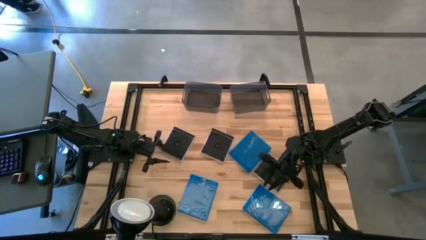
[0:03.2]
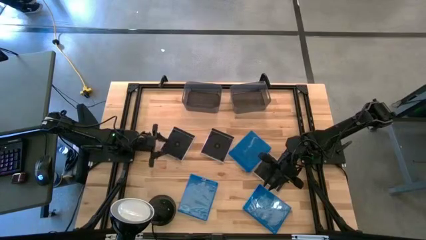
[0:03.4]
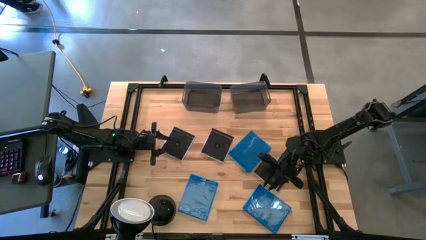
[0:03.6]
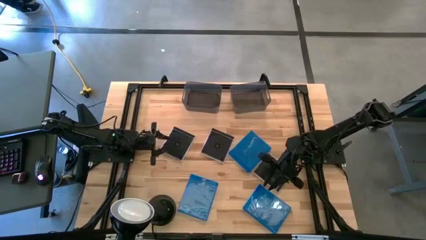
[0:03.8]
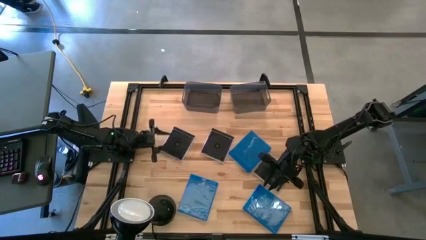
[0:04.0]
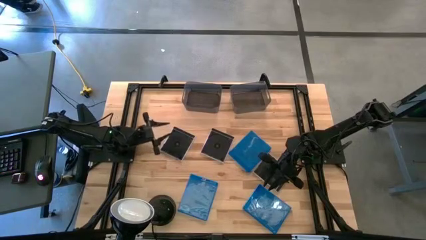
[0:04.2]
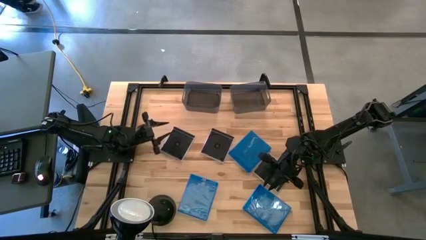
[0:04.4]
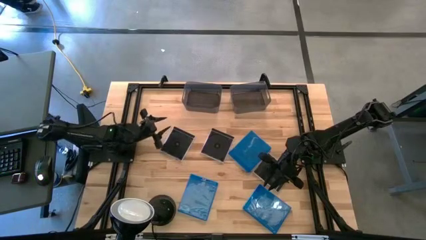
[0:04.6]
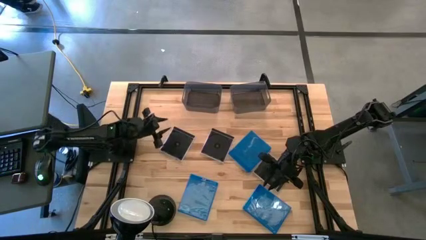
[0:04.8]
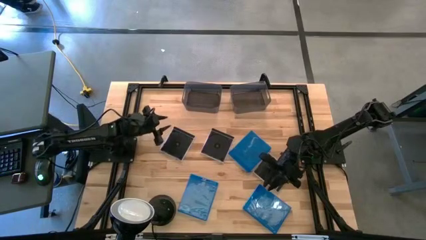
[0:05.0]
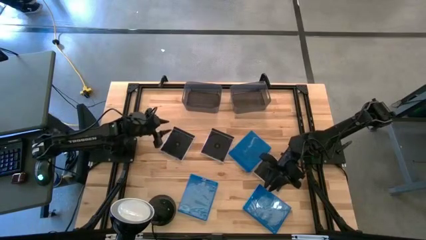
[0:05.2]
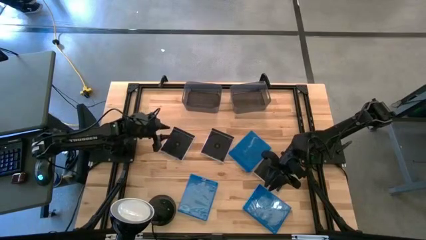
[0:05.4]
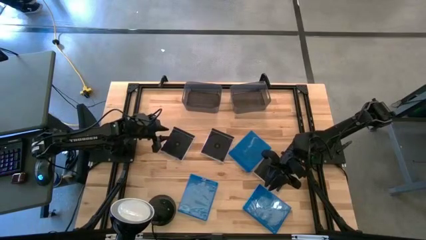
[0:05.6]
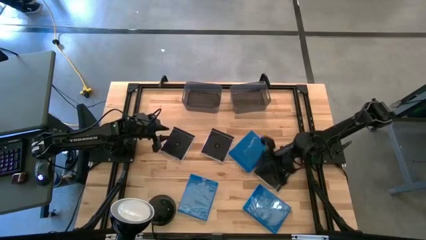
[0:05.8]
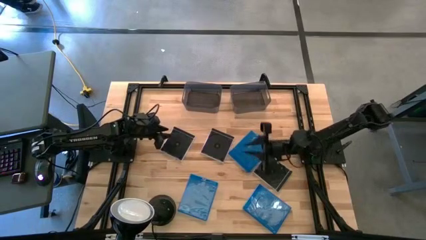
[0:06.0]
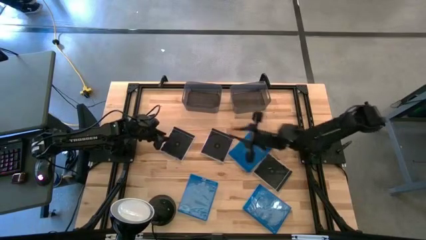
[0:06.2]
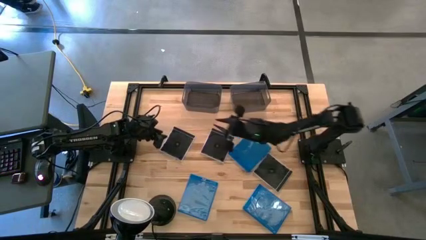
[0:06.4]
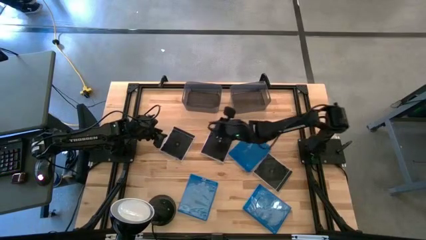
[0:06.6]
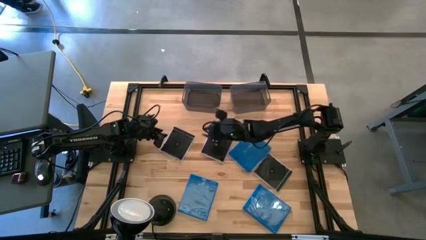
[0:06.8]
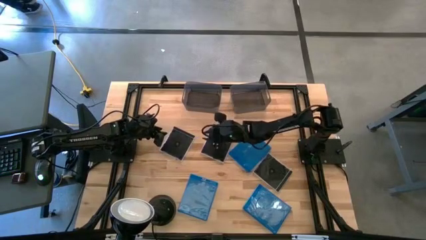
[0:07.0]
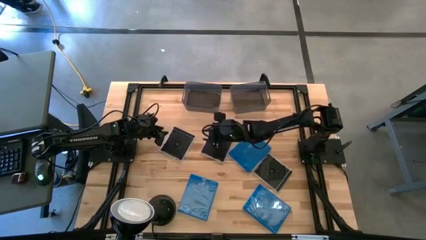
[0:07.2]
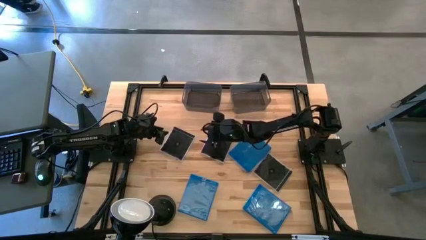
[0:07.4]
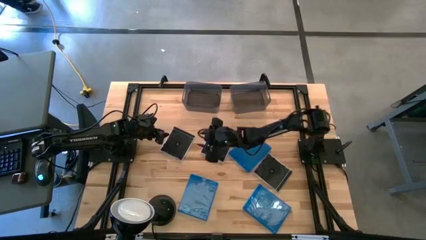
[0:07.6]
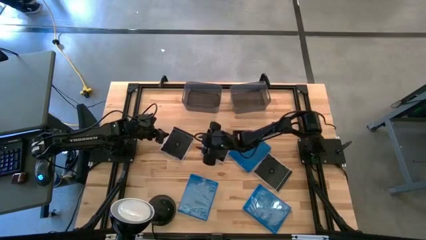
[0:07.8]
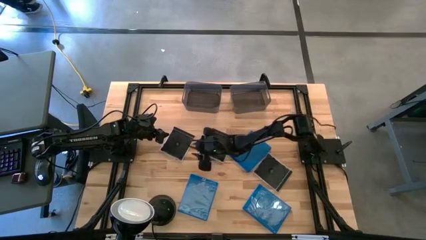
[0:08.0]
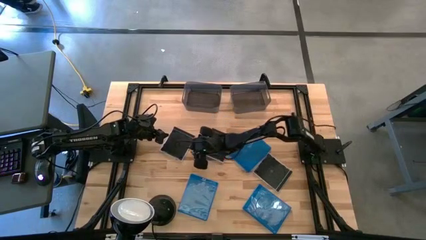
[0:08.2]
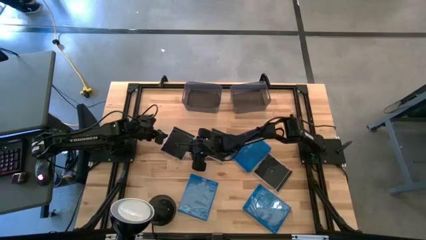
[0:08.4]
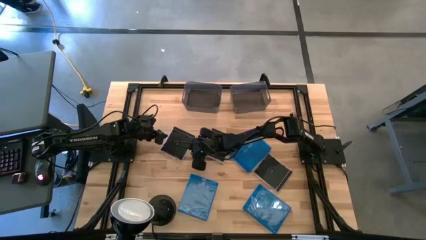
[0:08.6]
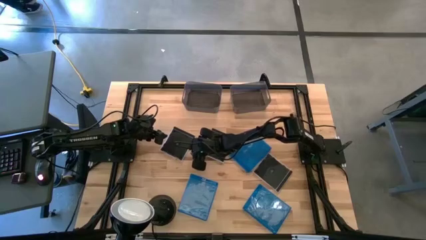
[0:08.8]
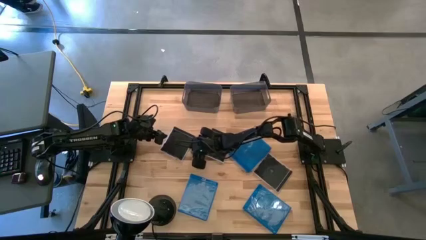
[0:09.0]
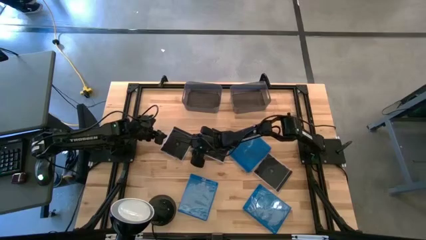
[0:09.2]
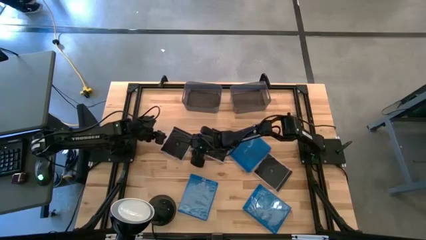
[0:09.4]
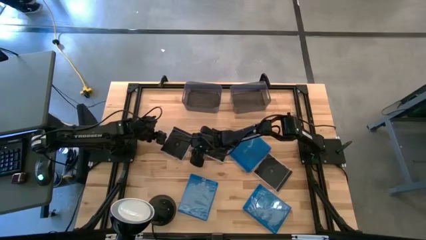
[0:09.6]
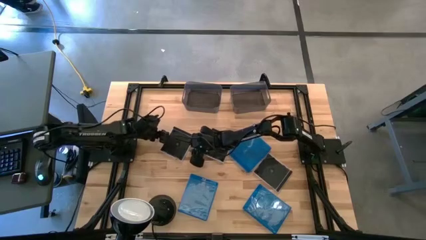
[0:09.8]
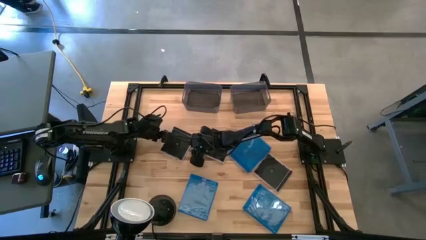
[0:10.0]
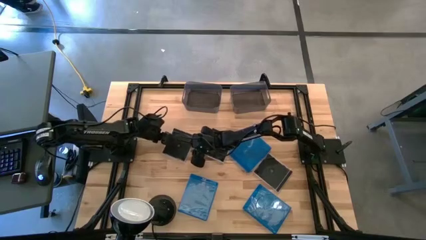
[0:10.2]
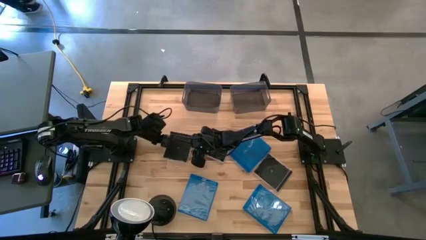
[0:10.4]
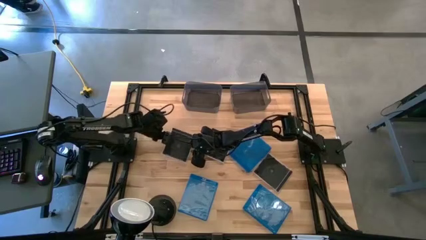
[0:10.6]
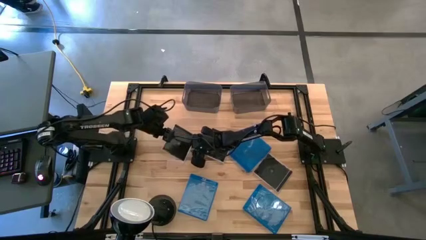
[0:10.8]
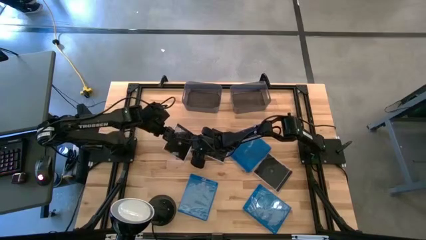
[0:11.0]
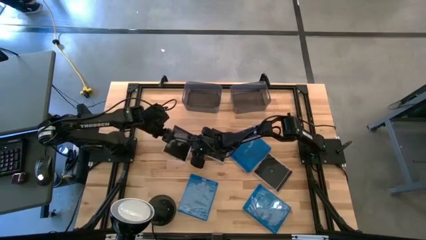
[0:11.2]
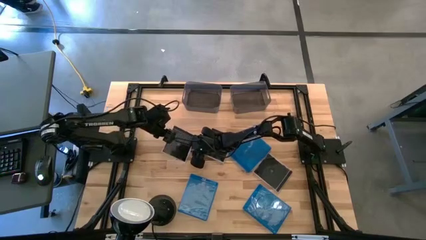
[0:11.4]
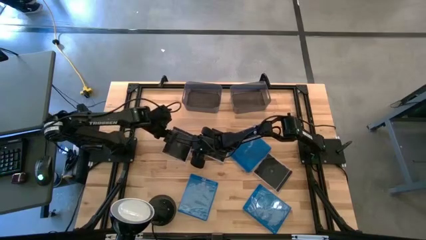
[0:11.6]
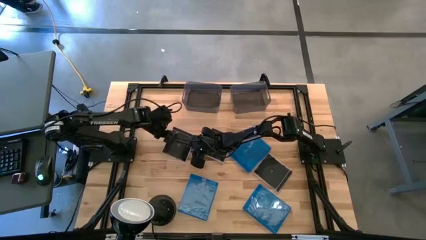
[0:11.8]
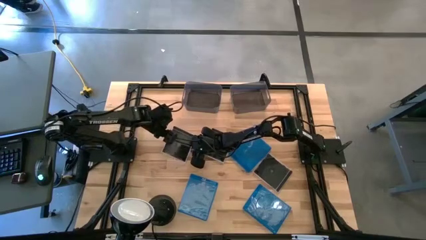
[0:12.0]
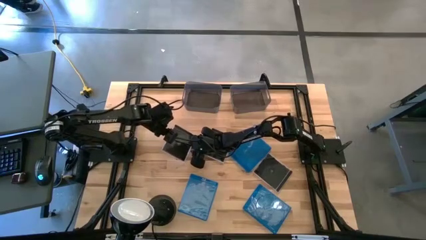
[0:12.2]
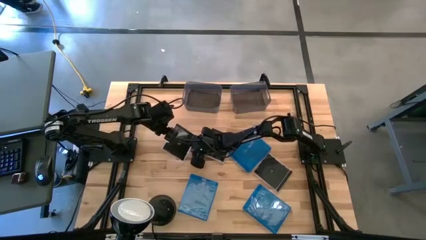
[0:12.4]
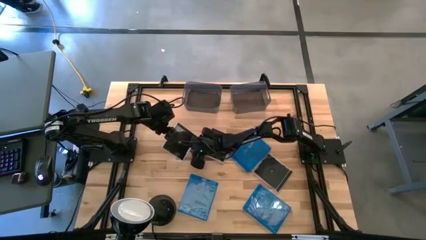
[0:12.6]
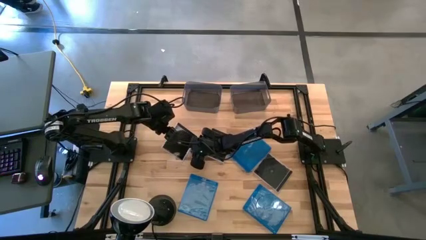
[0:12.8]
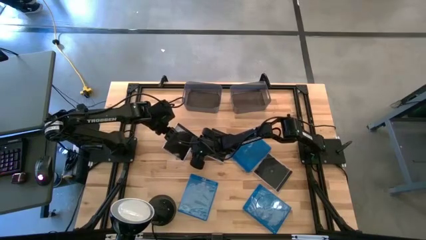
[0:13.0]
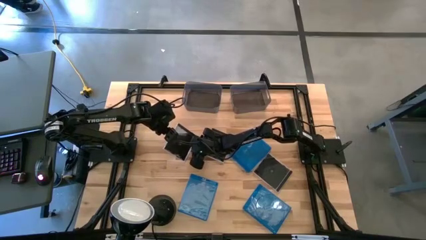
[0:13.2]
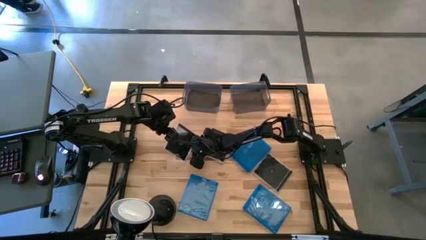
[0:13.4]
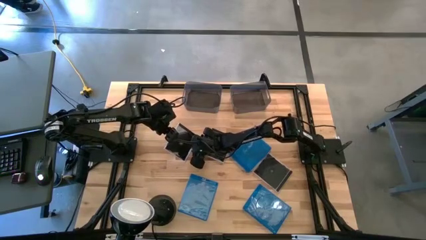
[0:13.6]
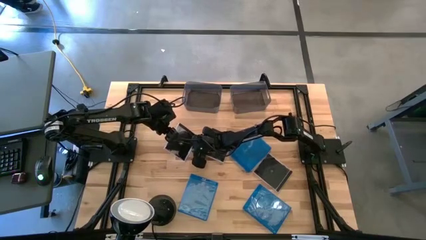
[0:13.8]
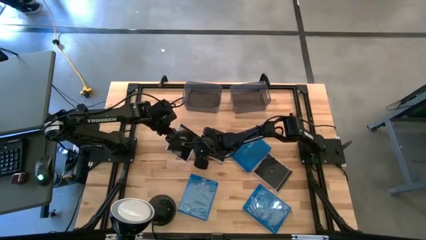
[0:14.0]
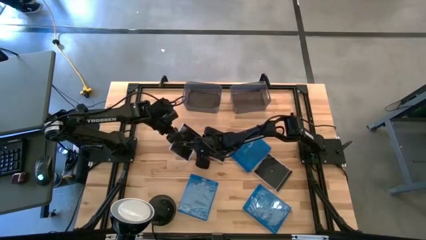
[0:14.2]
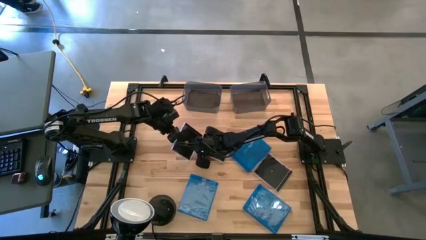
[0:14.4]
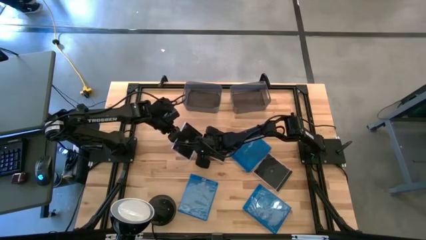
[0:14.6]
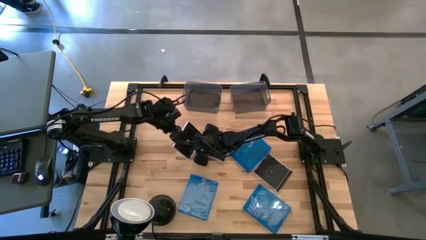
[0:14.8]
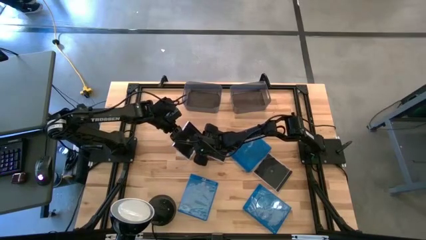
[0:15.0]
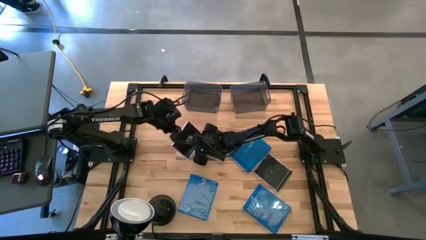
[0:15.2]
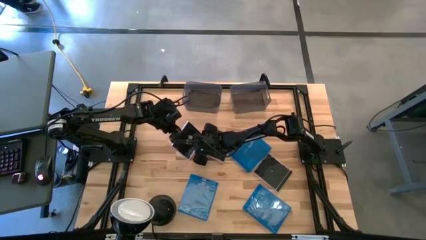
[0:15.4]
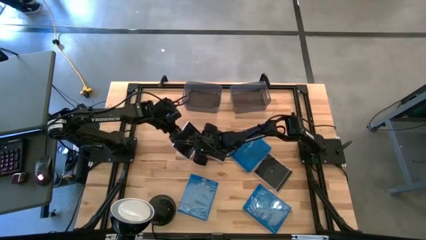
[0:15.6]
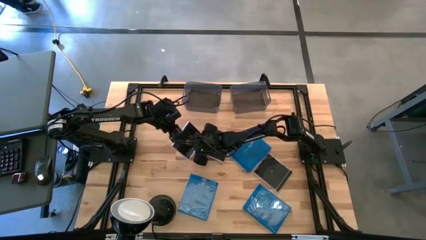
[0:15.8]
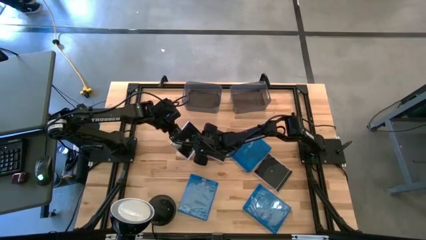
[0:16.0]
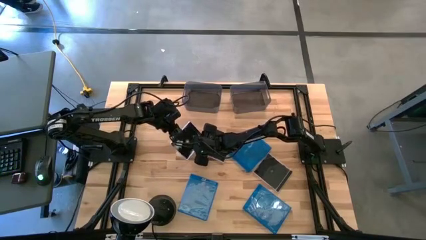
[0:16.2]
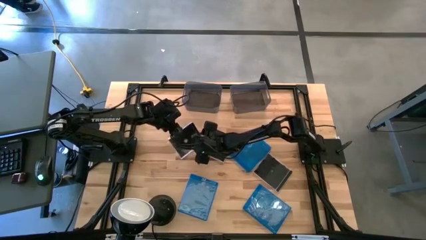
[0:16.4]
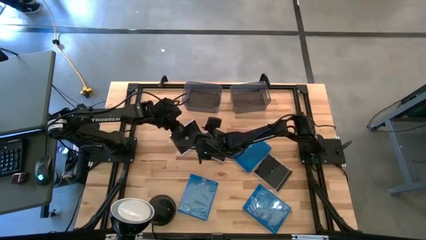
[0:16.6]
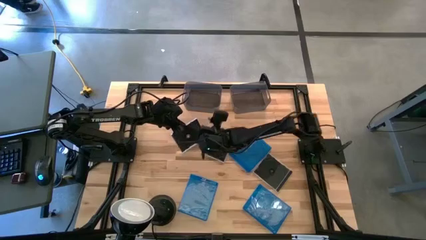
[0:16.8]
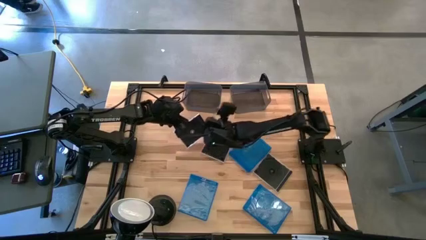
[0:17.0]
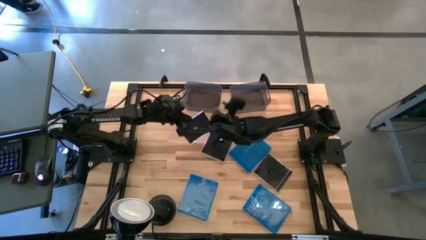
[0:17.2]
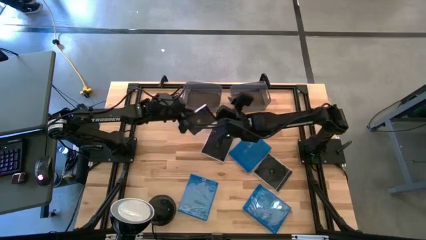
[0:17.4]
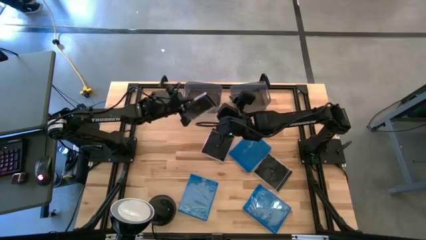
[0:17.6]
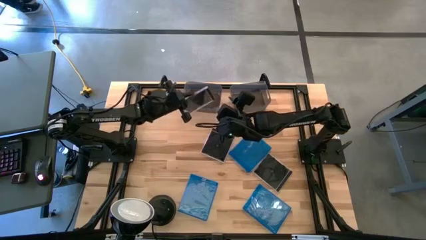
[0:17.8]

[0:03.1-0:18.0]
Task: Pick & place jewel cases by type
Put the top left black cd case into the left black bin
